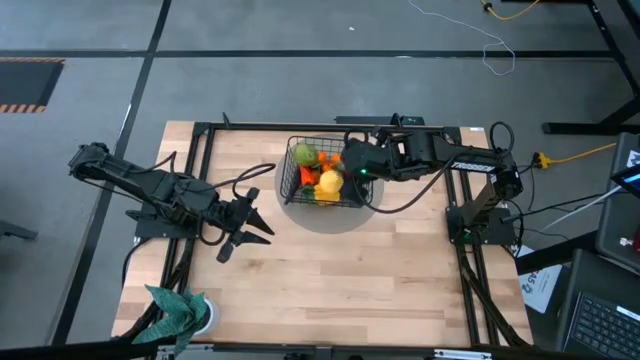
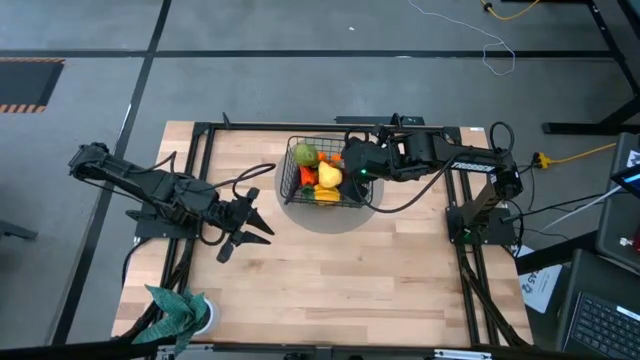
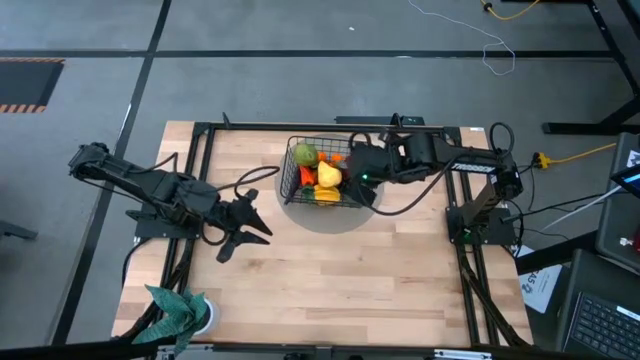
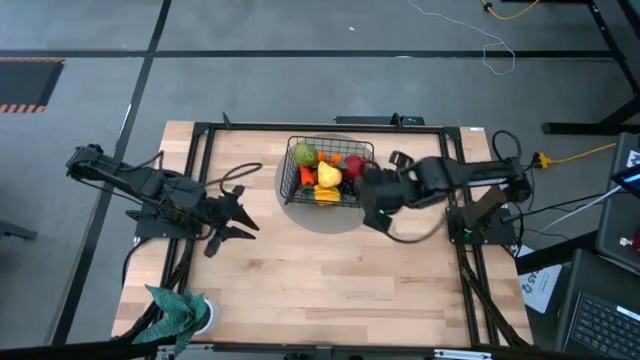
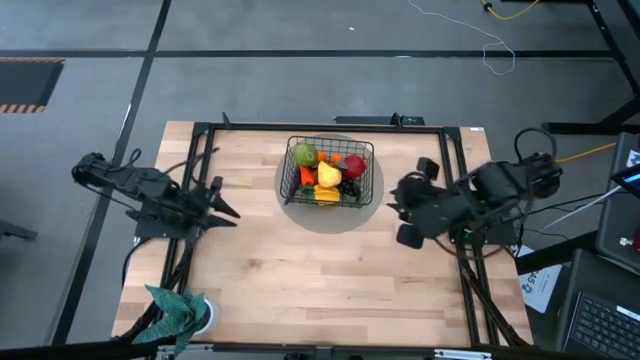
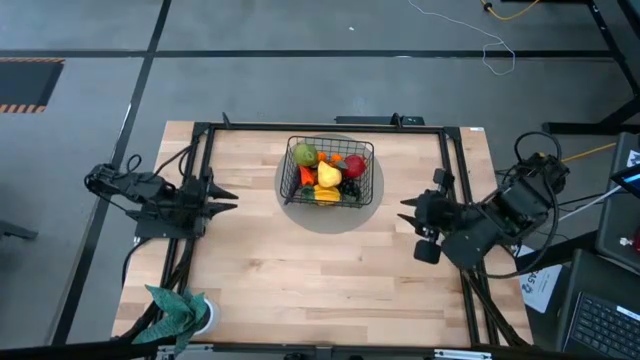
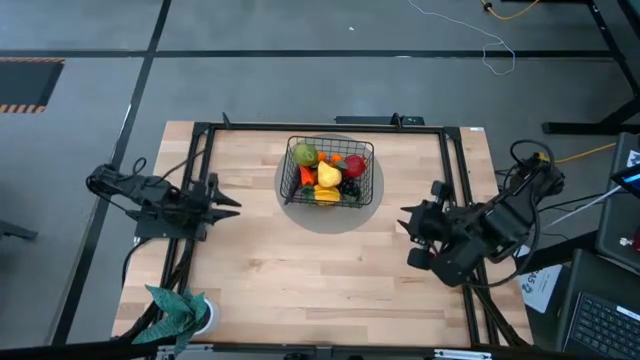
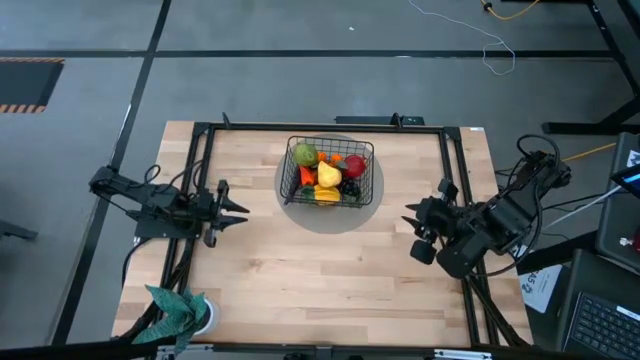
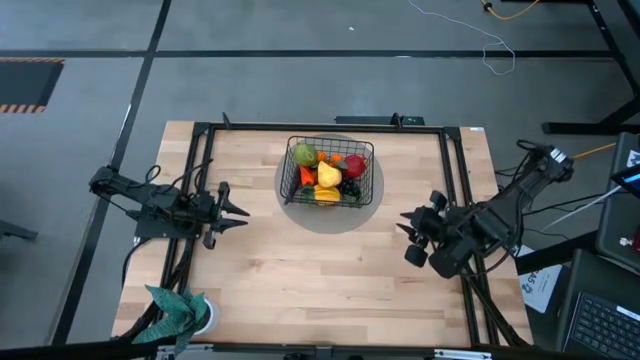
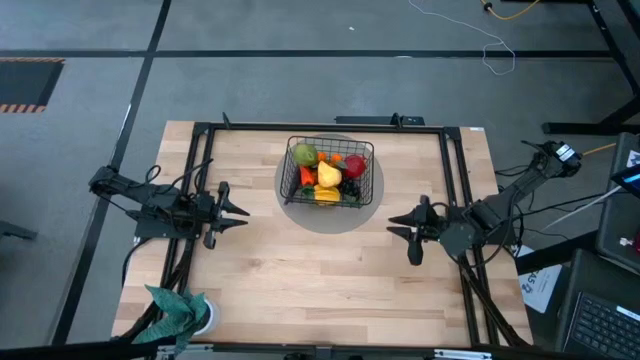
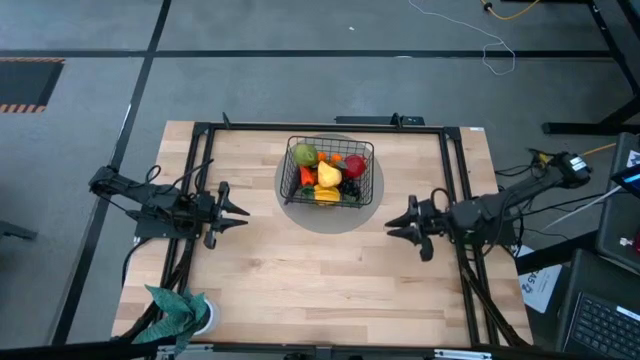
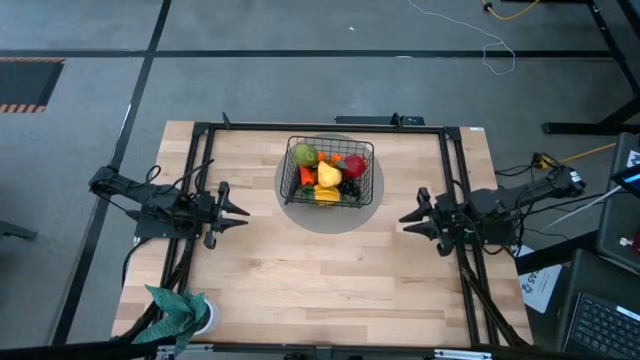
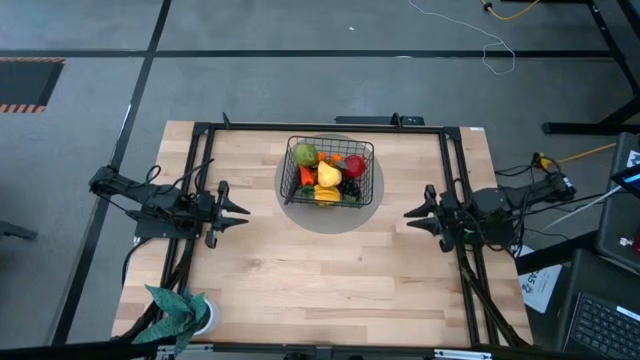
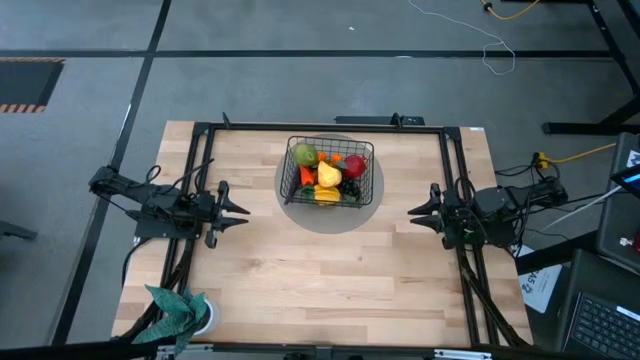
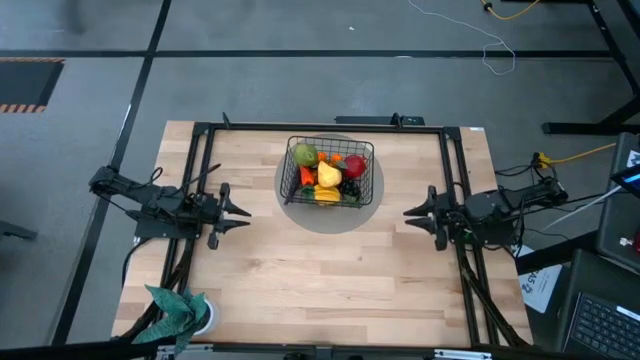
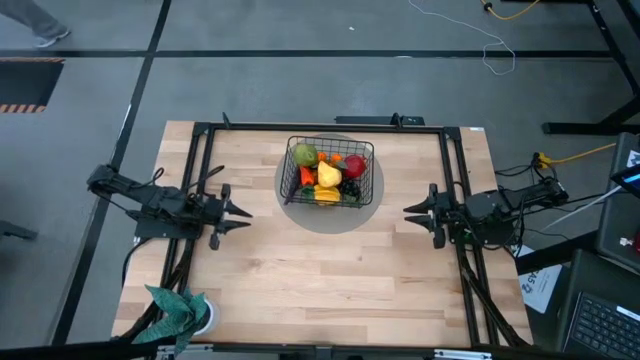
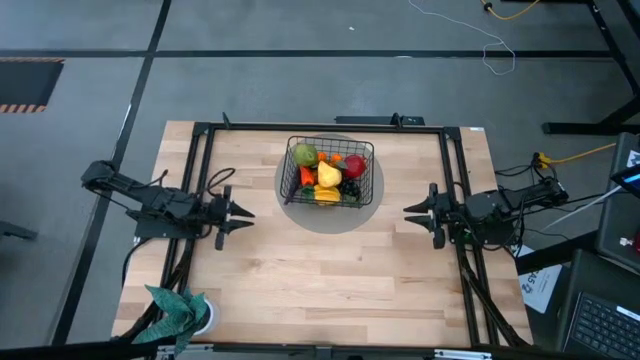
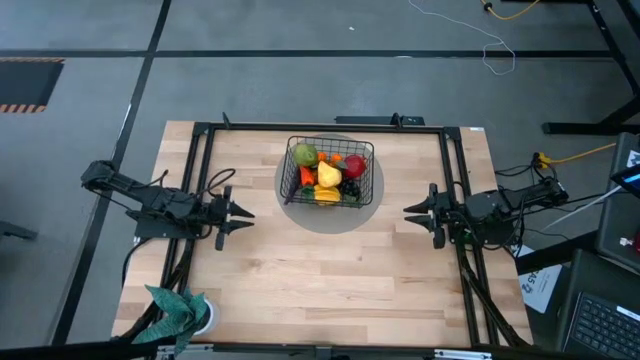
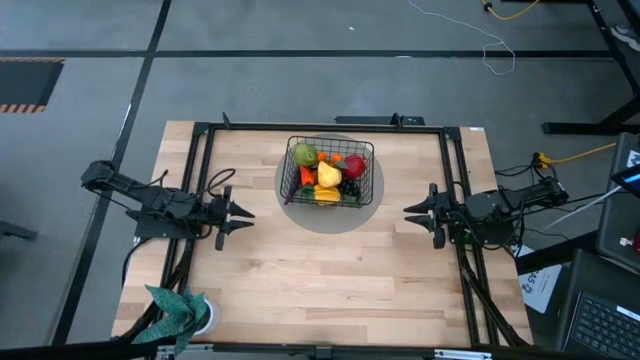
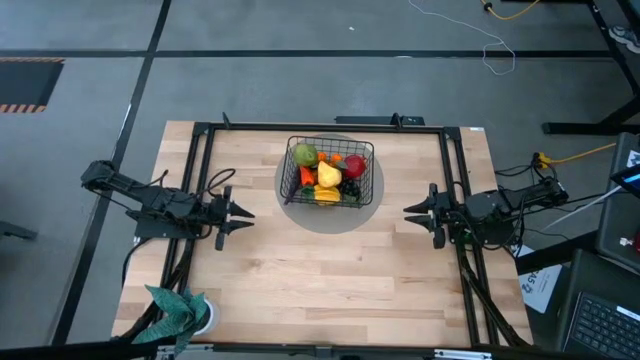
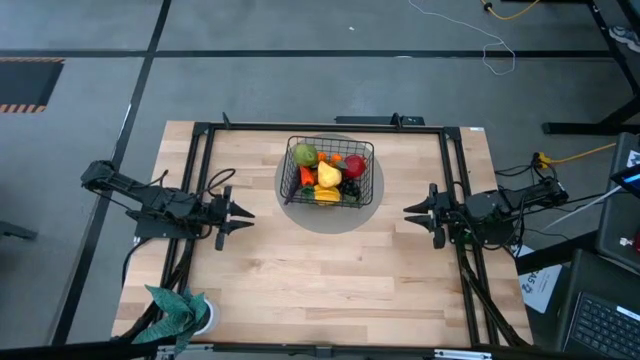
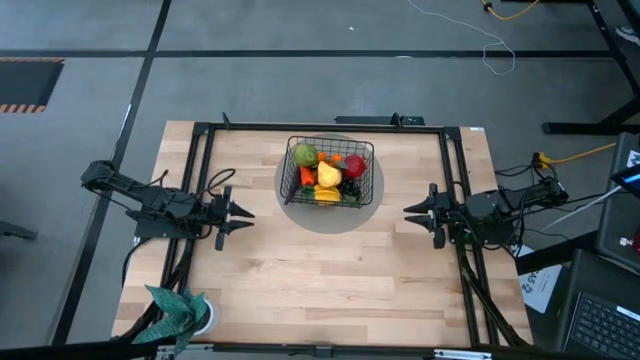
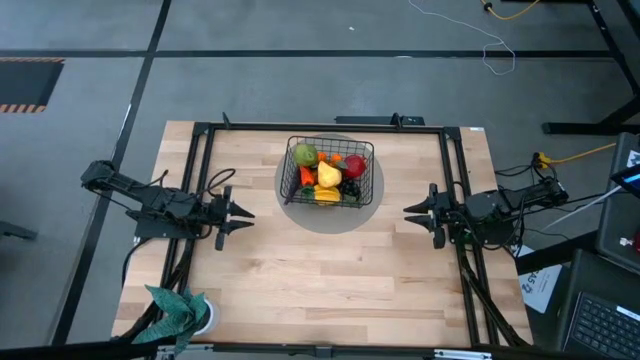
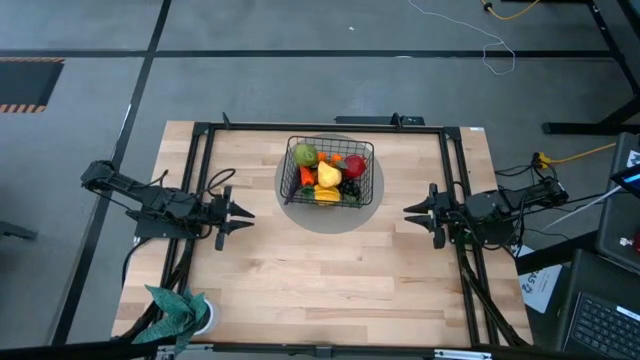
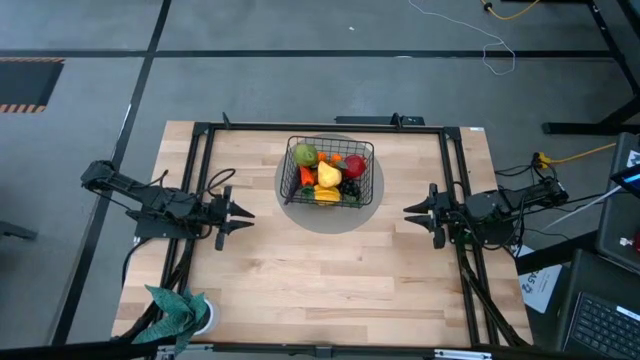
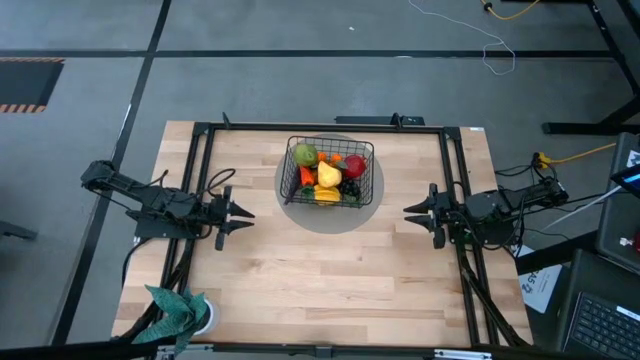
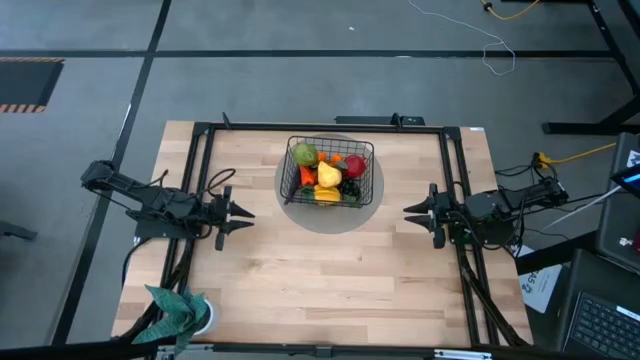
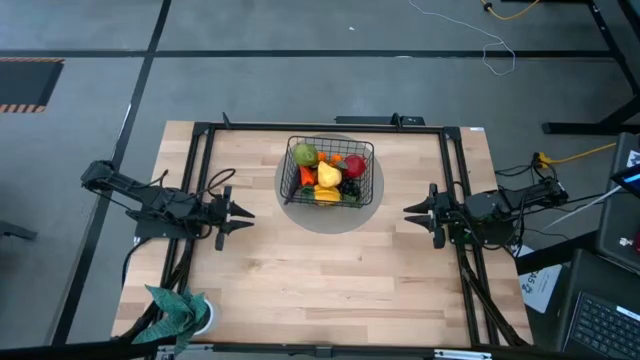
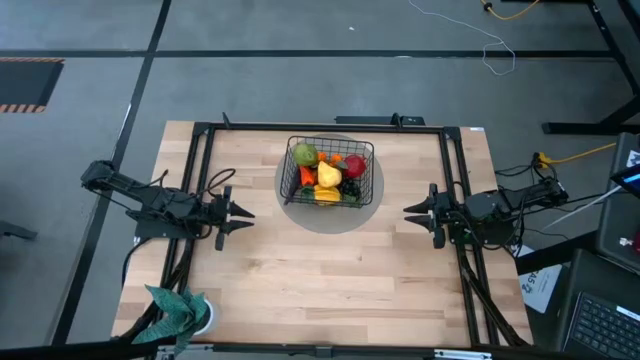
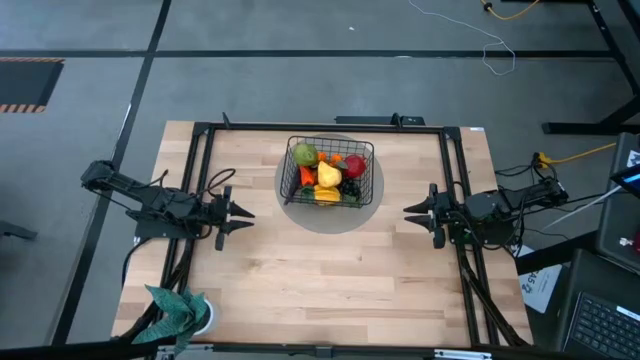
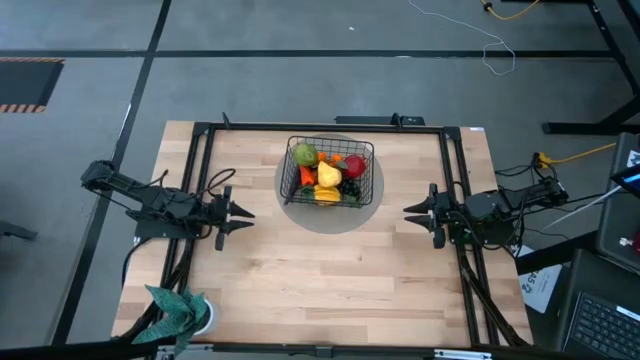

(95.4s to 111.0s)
Task: Build produce basket
Return to Home Position

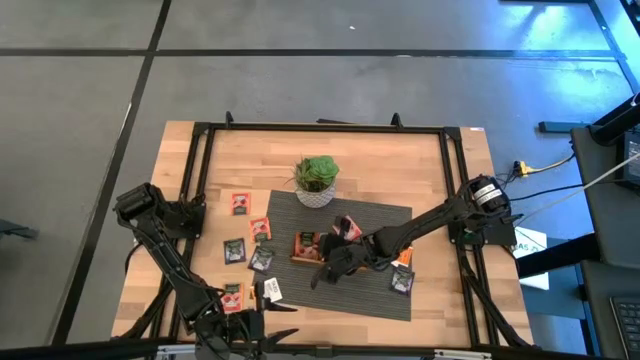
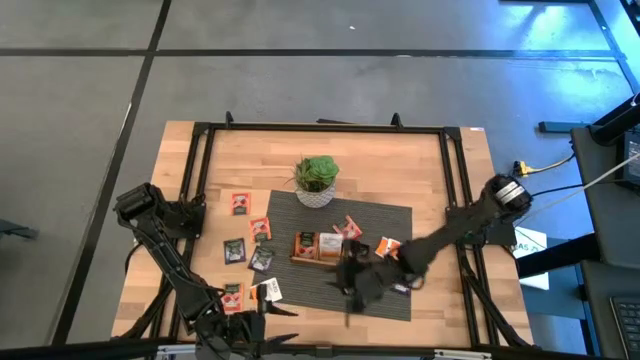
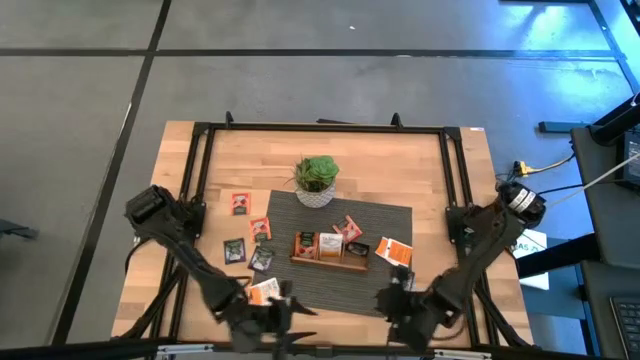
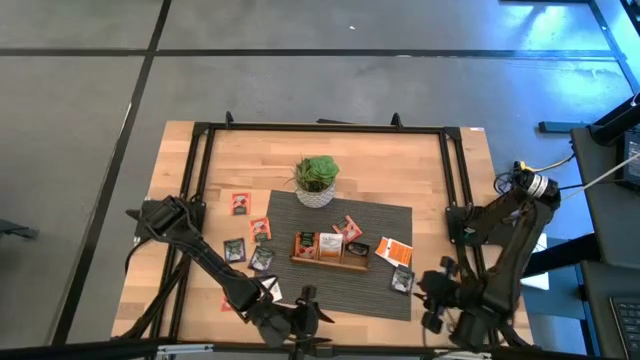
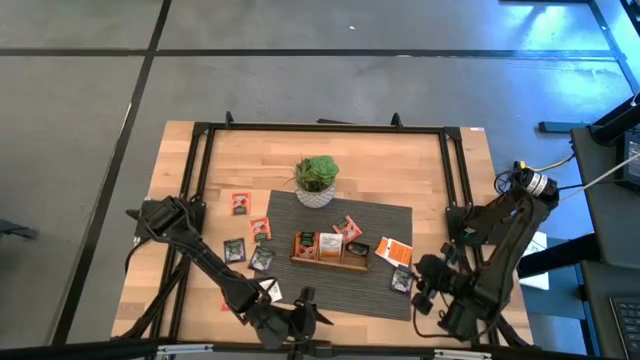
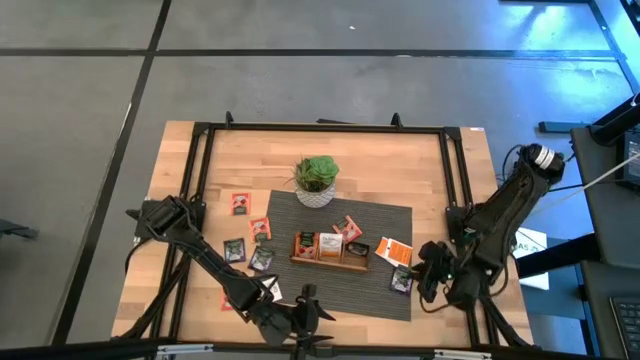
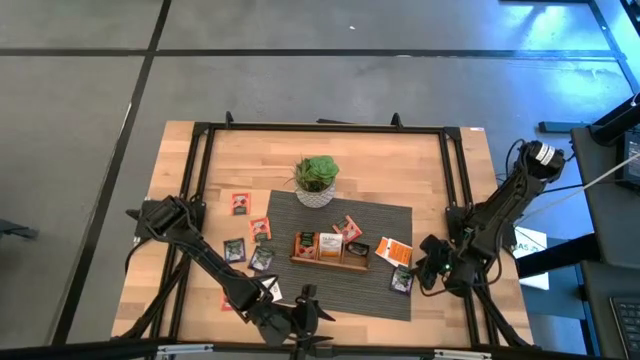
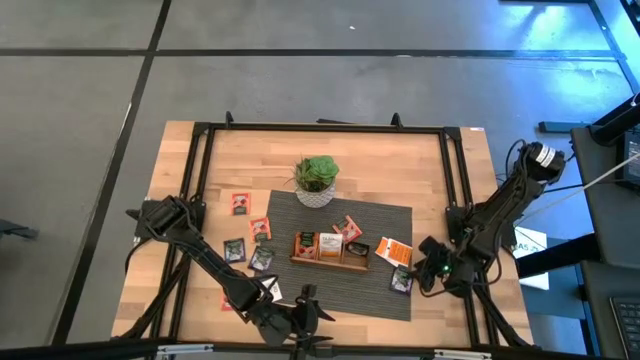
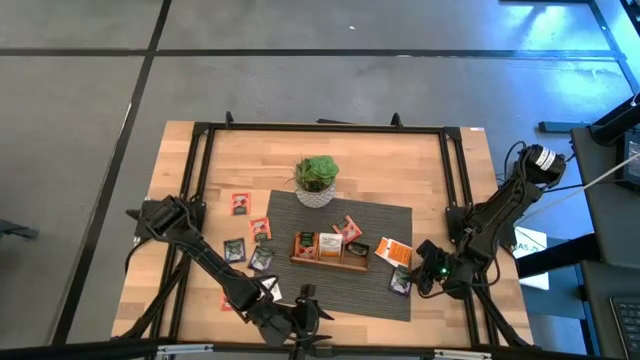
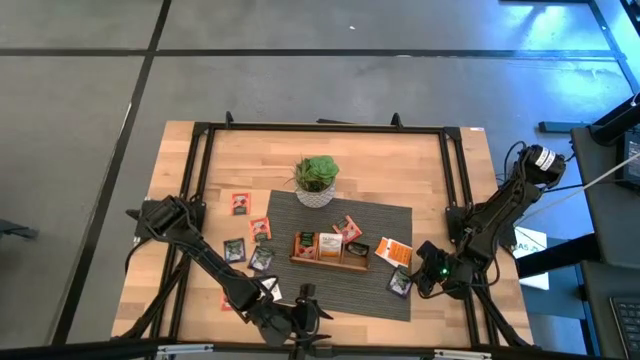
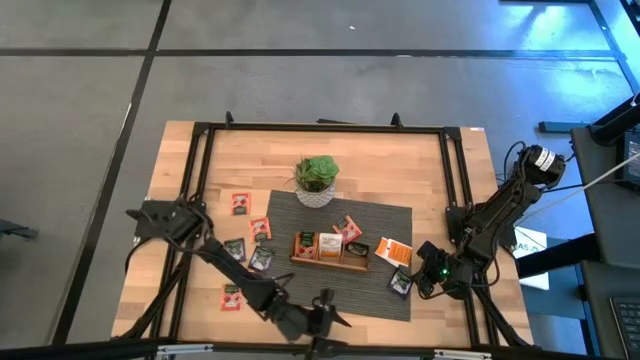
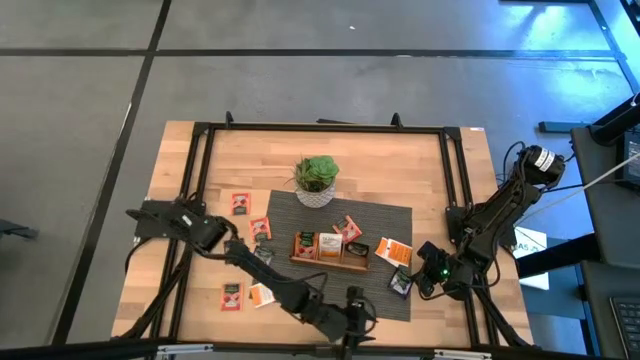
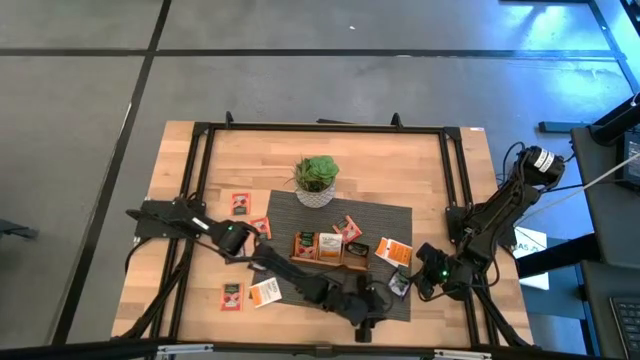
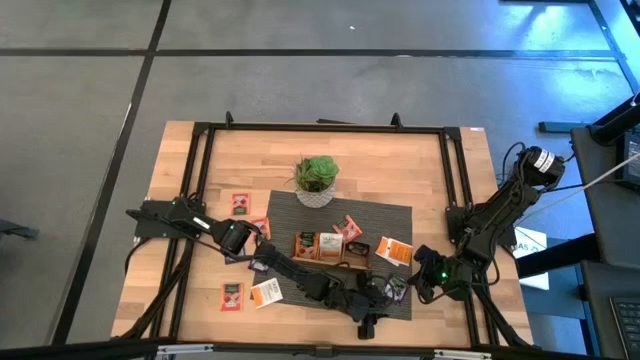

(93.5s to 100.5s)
Task: Pick & Place Tea
Put the violet tea bag into the right section of the wooden organizer
